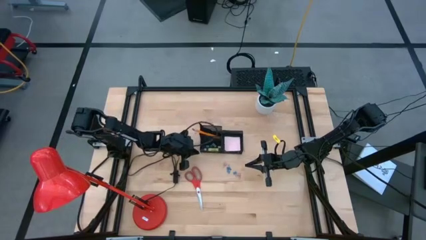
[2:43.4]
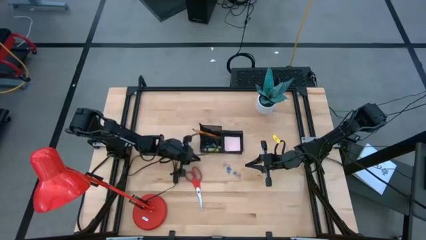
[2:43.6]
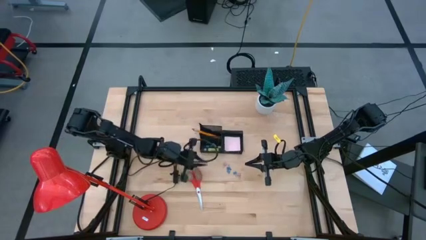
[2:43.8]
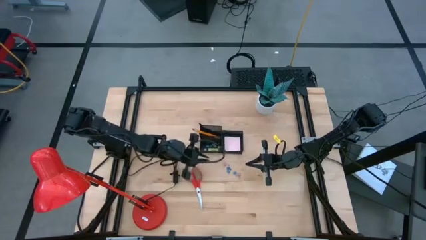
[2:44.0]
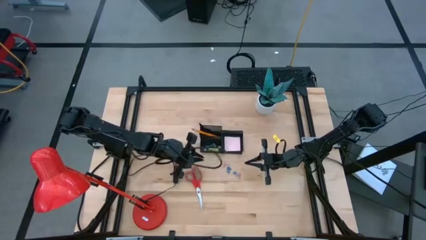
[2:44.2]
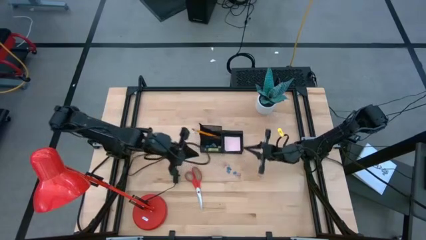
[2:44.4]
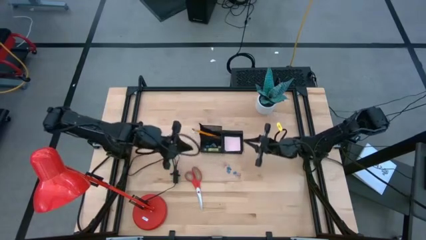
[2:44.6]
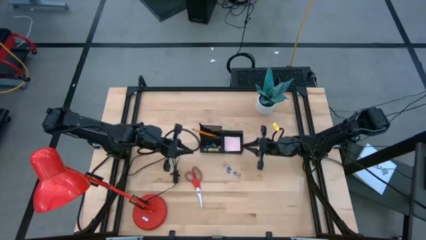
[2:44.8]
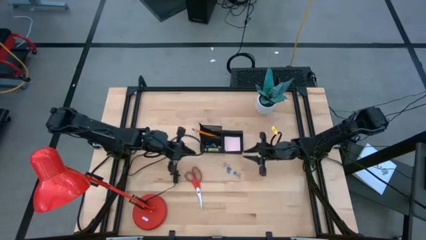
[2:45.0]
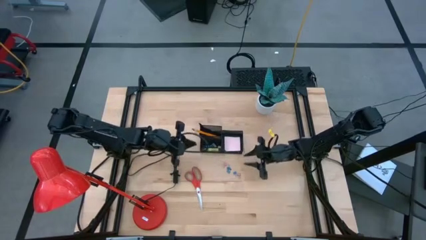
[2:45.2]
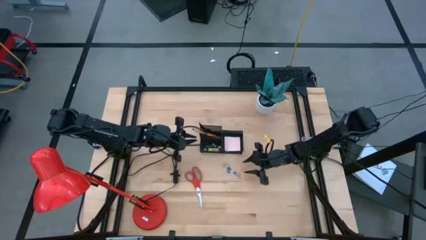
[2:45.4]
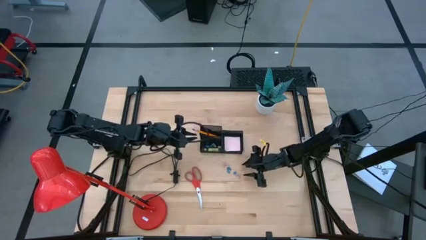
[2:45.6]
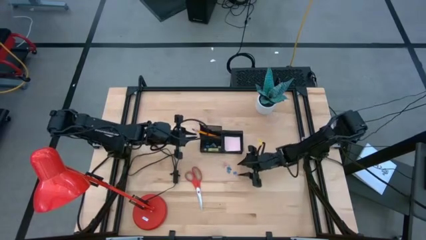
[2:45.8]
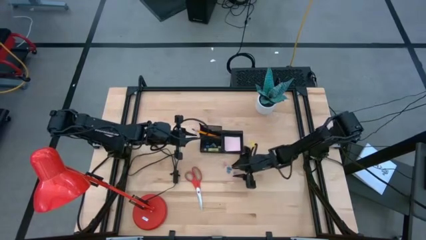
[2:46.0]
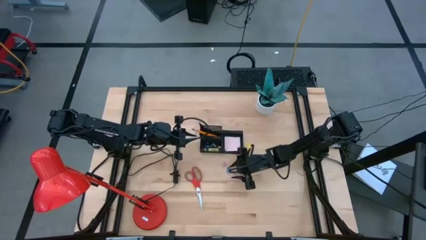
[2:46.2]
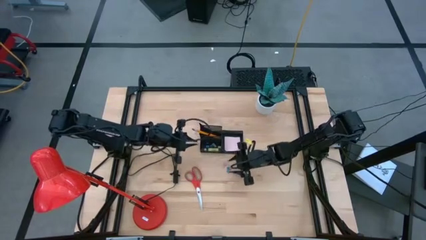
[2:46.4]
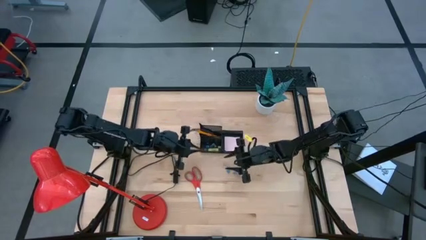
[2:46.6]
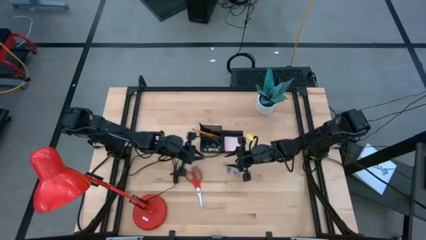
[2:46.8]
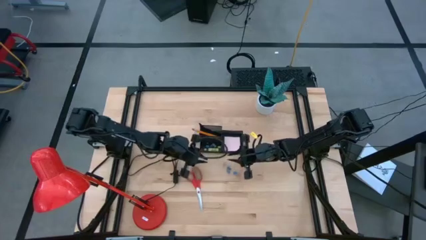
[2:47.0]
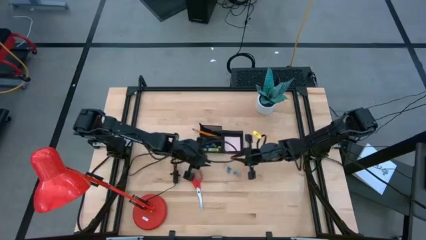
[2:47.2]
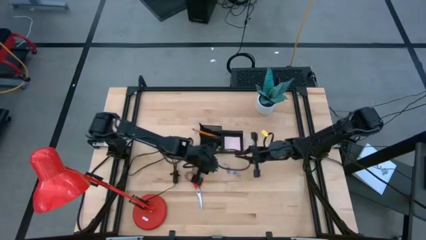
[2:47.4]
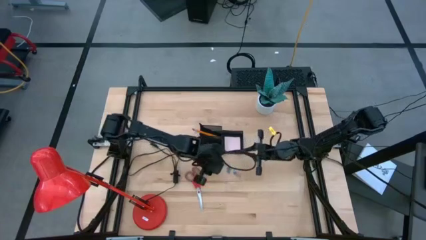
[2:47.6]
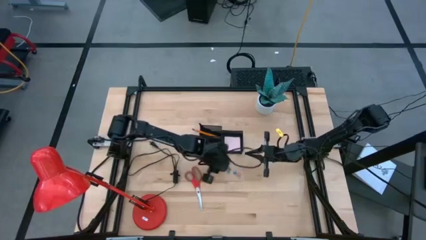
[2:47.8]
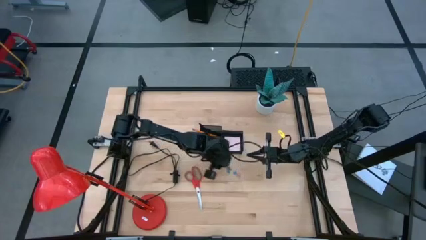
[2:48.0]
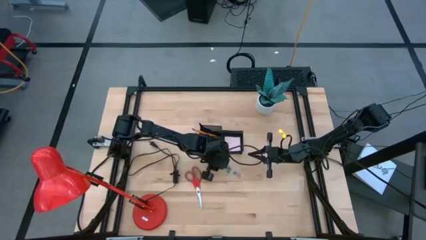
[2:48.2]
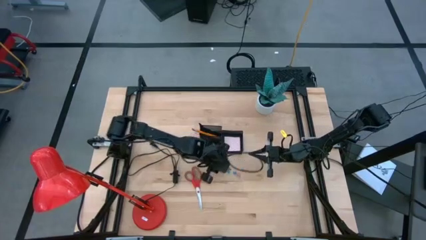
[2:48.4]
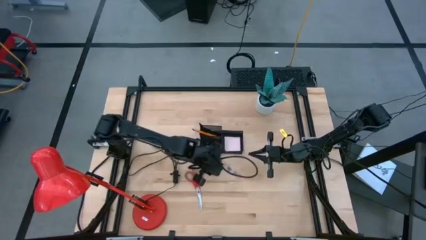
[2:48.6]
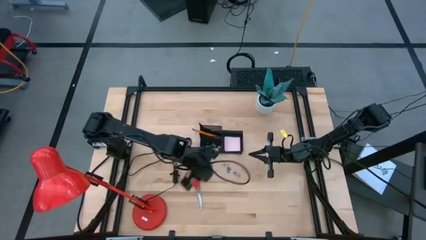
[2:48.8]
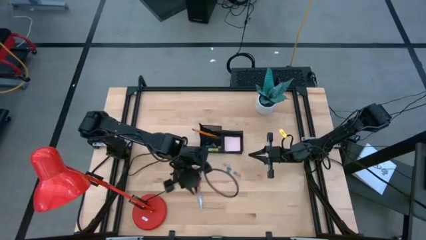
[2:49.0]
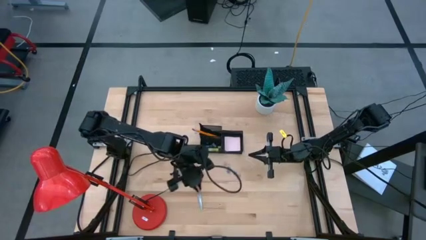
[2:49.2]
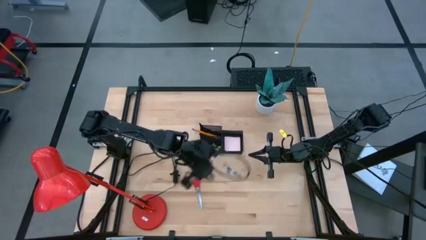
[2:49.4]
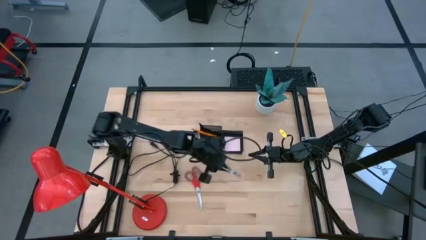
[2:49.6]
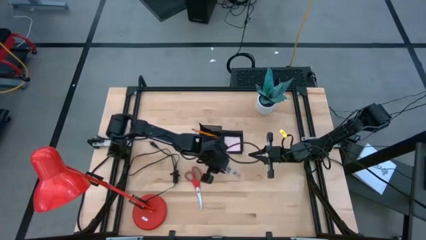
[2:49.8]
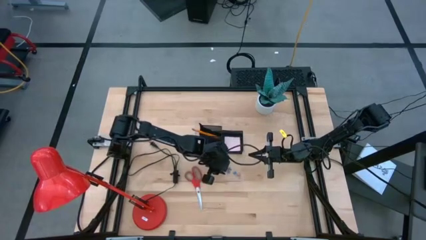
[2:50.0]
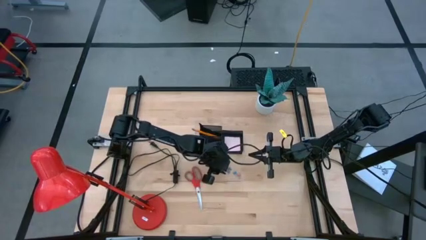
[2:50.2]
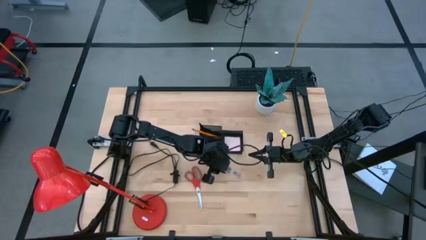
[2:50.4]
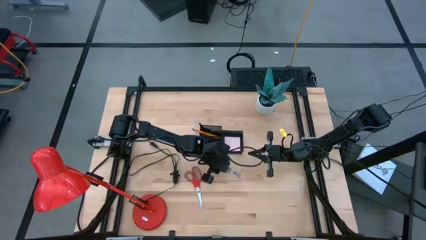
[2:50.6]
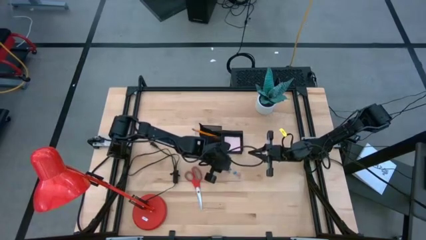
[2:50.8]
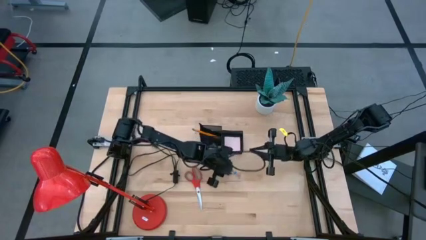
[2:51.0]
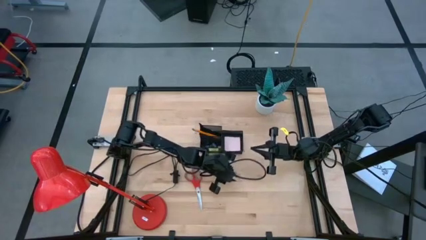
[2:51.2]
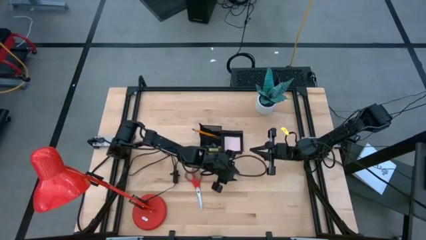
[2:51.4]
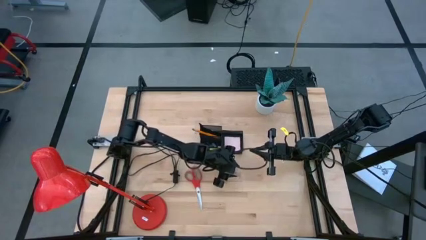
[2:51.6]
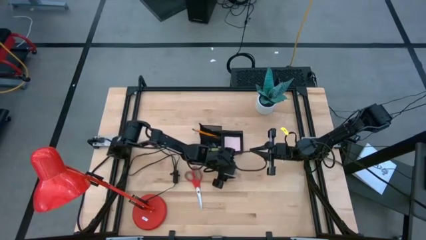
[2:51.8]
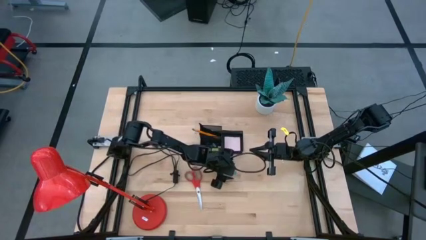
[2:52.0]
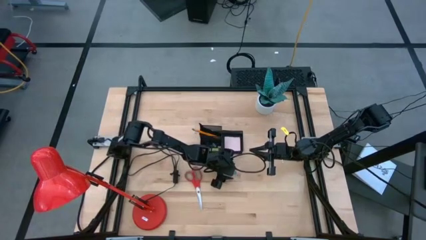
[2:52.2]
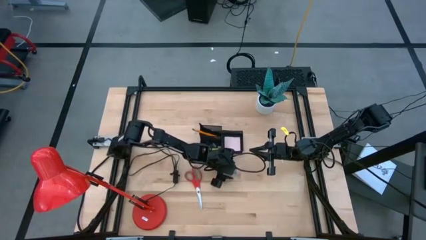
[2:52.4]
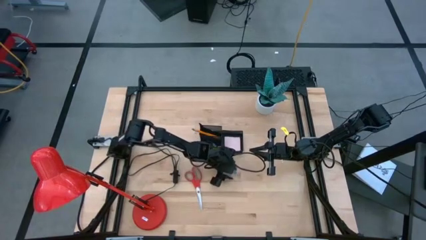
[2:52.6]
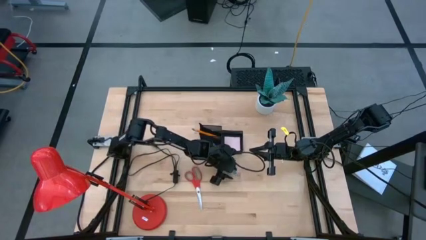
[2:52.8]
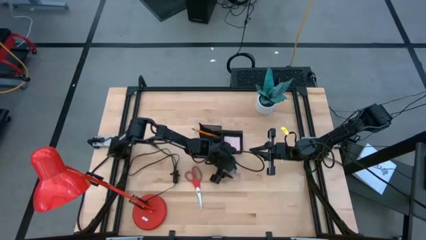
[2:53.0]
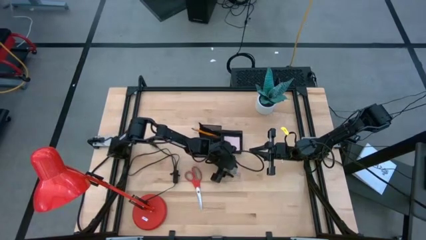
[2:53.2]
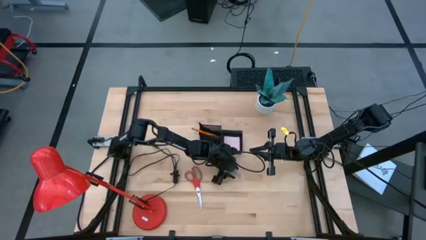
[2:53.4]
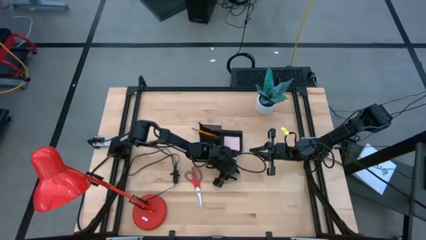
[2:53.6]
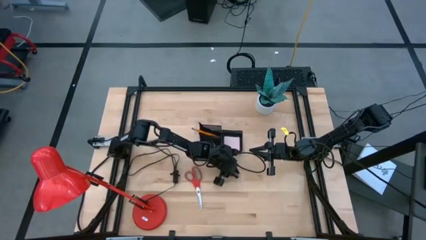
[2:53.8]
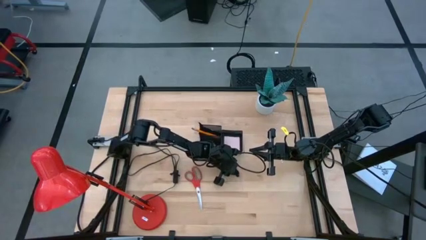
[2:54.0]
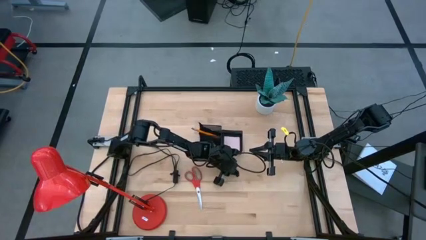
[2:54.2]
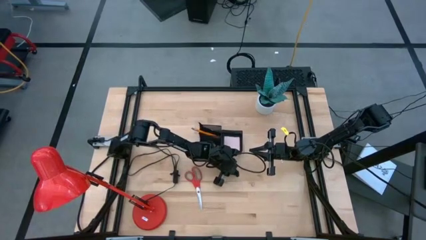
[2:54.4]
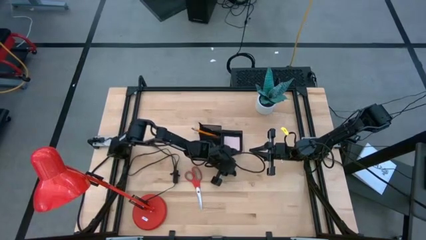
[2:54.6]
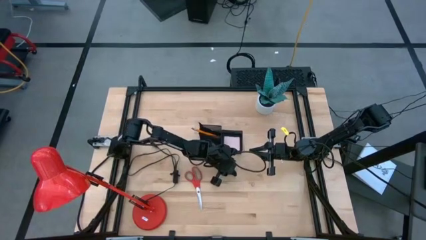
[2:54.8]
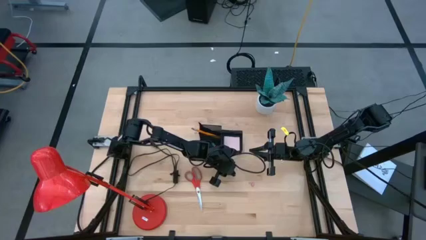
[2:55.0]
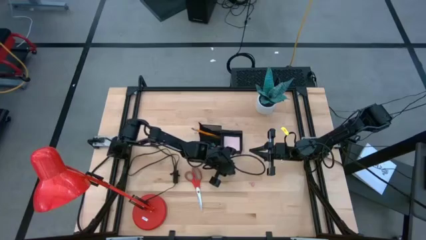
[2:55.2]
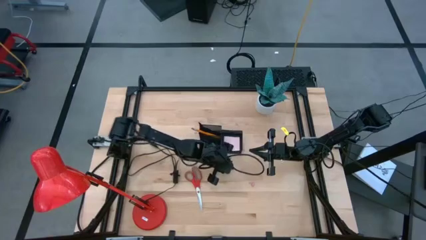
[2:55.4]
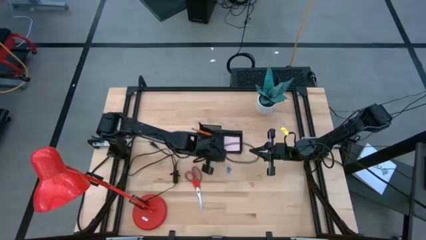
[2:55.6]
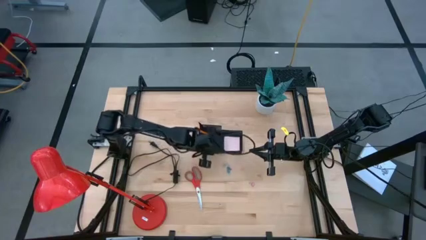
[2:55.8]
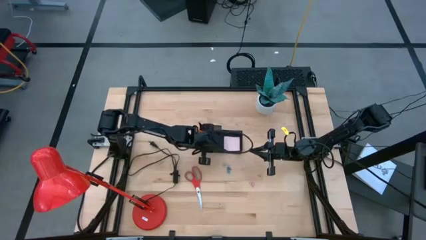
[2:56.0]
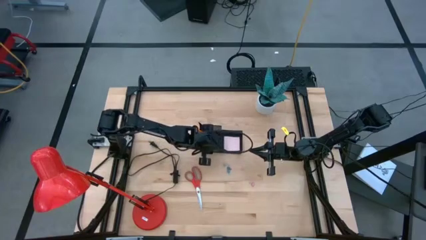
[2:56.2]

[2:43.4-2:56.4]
Task: Pick and place office supplies into organizer
Put the blue binder clip into the black desk organizer

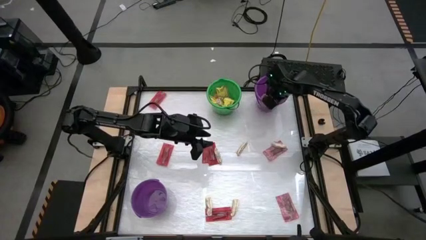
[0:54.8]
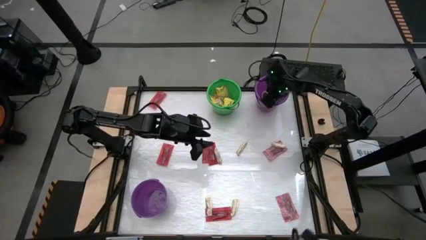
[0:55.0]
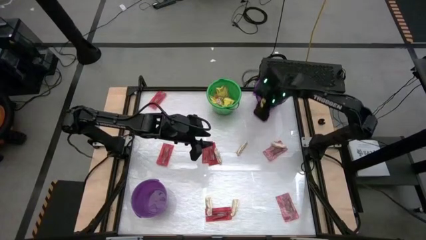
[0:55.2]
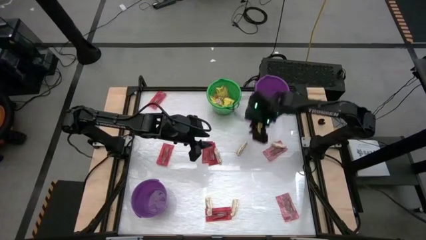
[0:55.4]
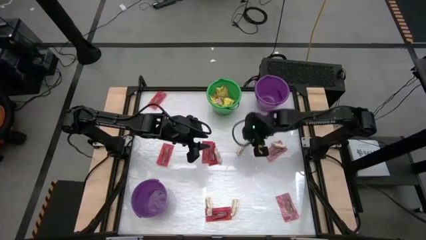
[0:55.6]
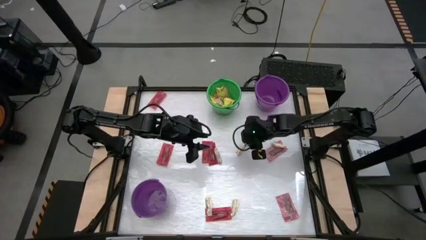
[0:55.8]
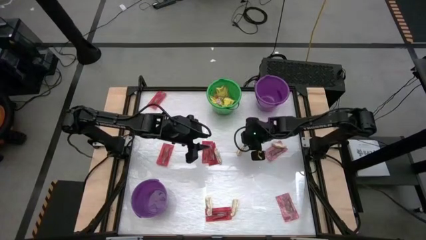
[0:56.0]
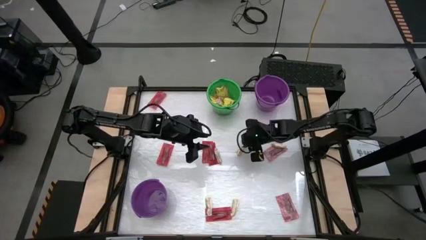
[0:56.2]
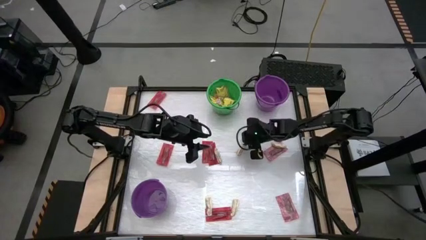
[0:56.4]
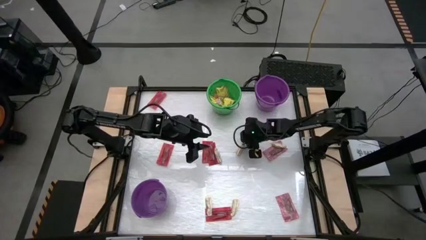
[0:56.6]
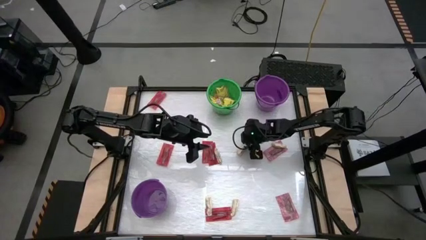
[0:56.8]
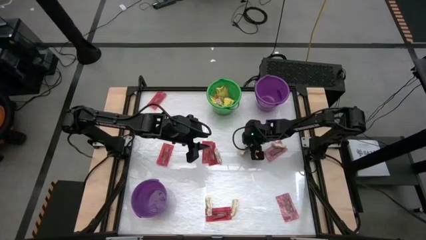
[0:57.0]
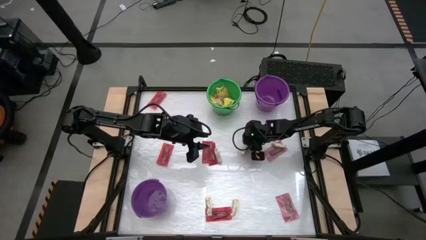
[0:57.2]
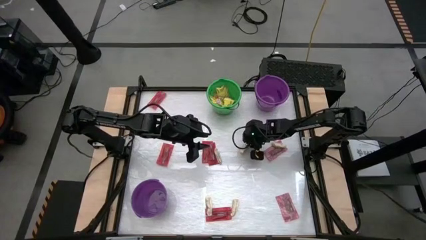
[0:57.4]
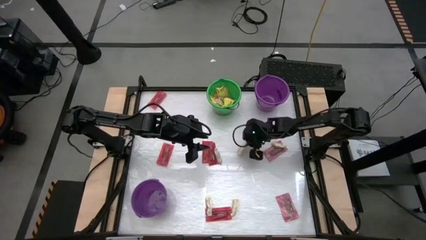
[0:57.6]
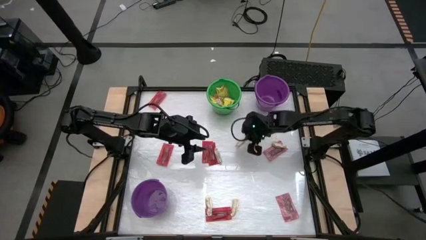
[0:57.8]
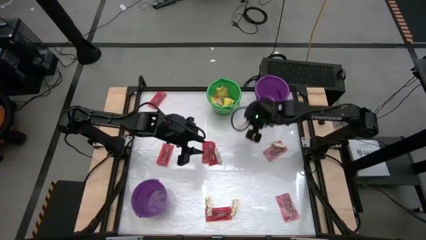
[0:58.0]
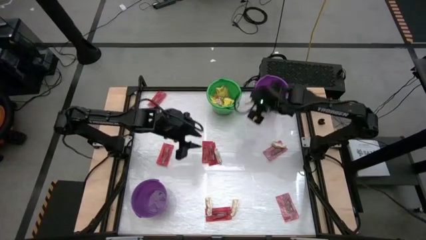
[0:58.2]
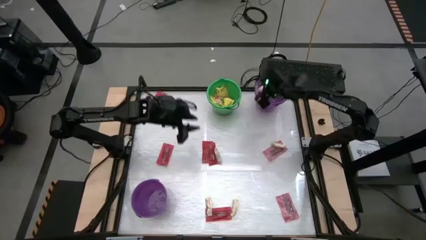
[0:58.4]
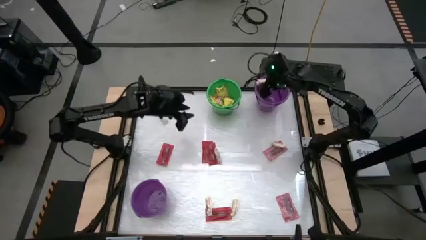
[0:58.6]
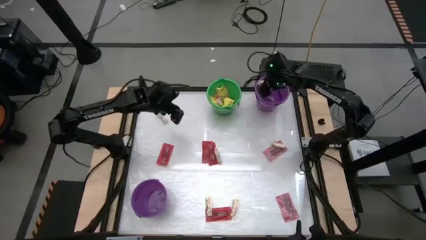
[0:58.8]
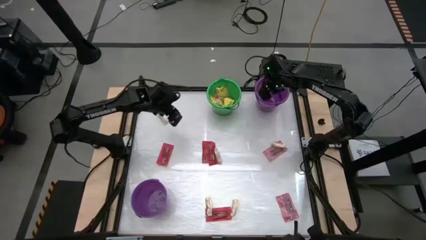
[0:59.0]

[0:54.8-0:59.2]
Task: Sort candy by brand, put in halloween buckets
Put the light brown chocolate bar into the top violet bucket
